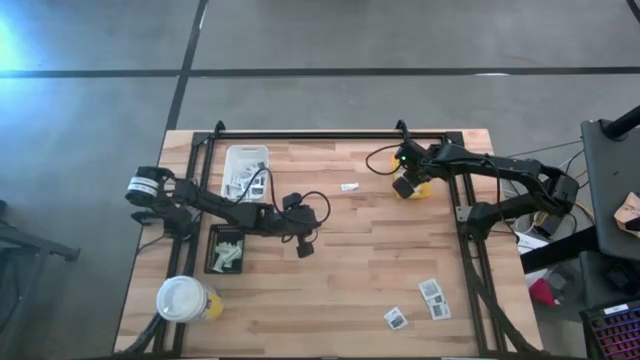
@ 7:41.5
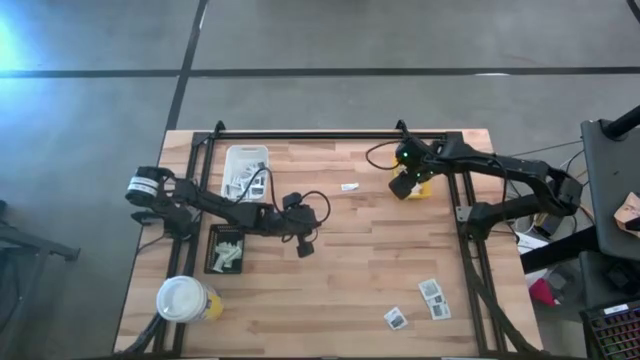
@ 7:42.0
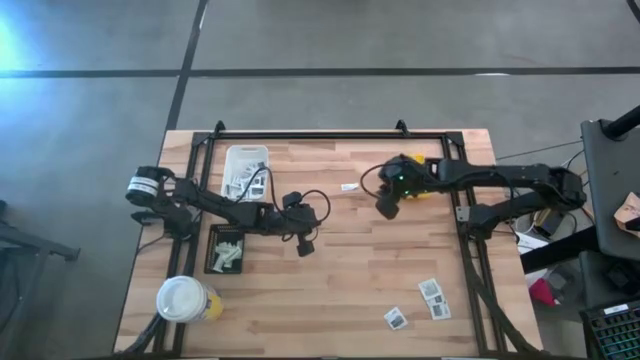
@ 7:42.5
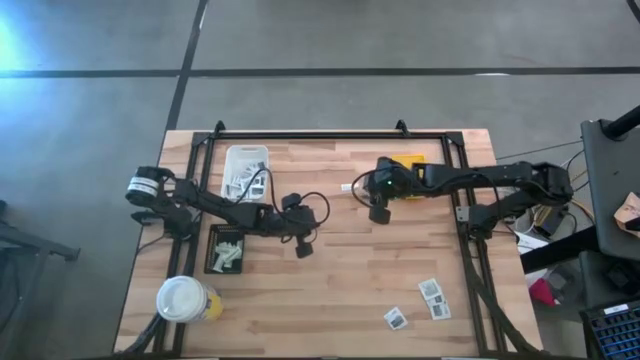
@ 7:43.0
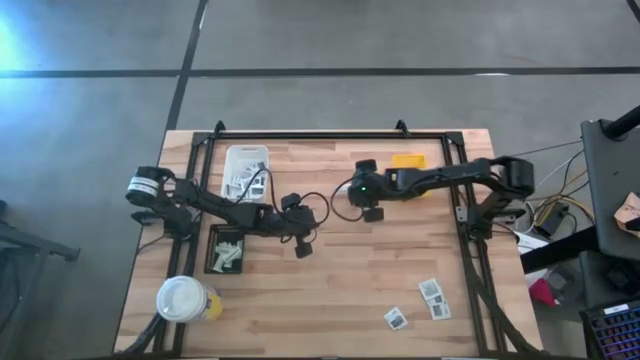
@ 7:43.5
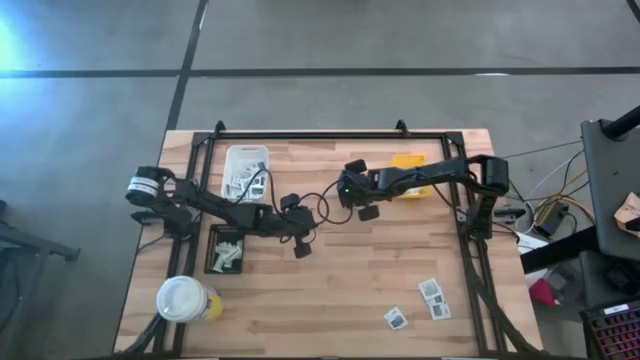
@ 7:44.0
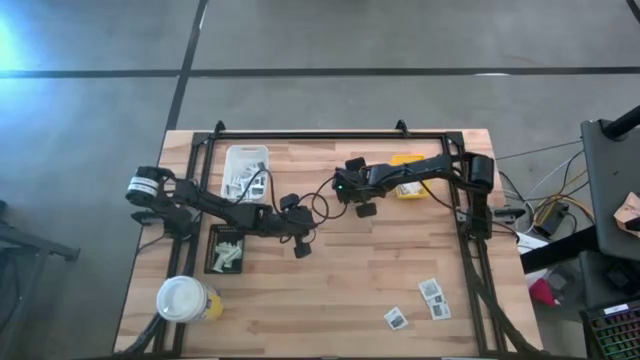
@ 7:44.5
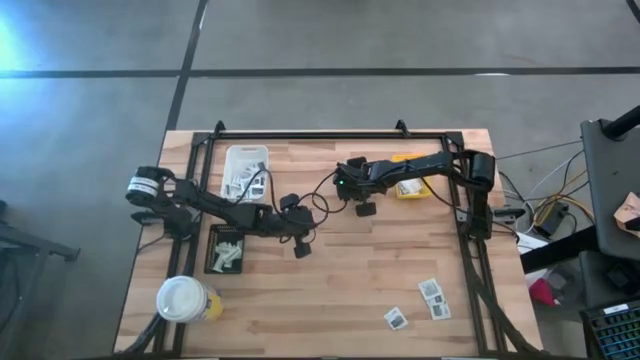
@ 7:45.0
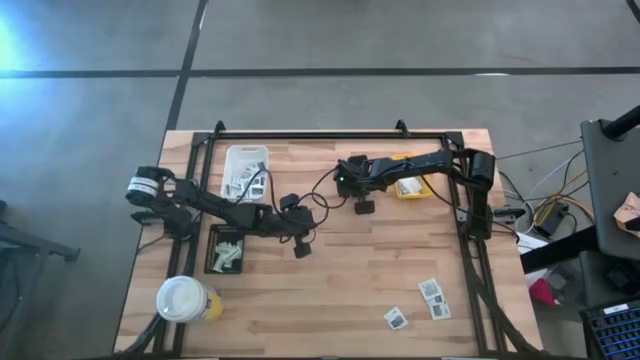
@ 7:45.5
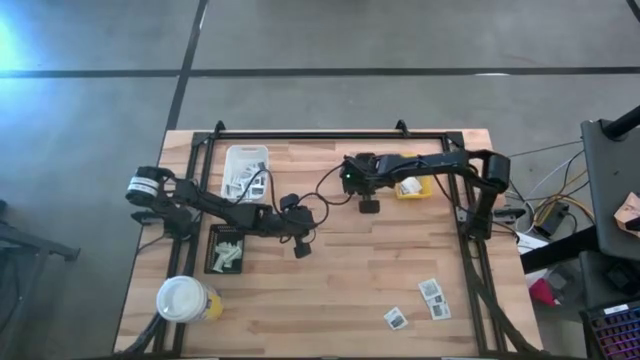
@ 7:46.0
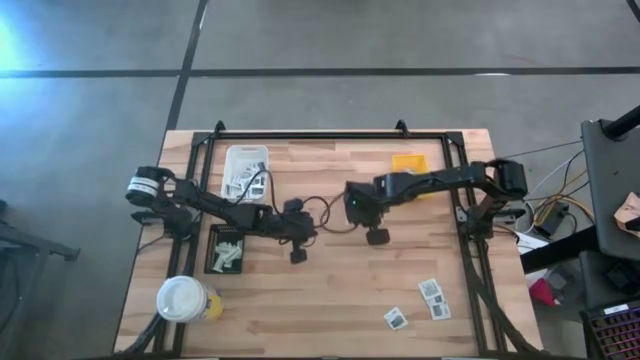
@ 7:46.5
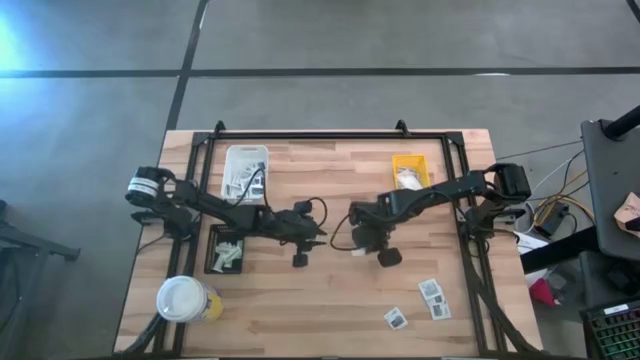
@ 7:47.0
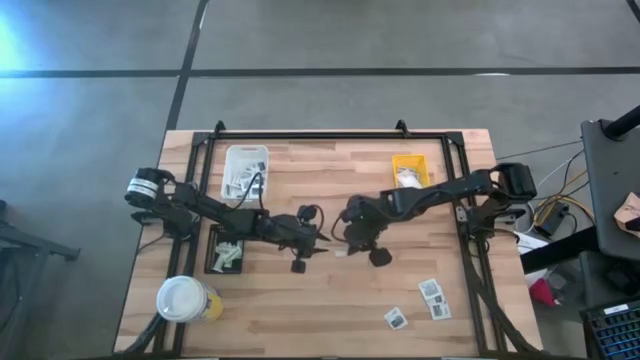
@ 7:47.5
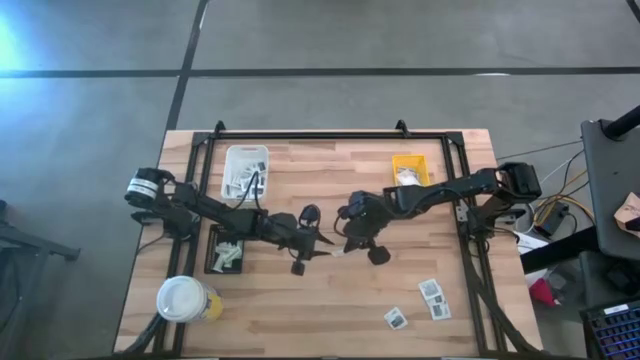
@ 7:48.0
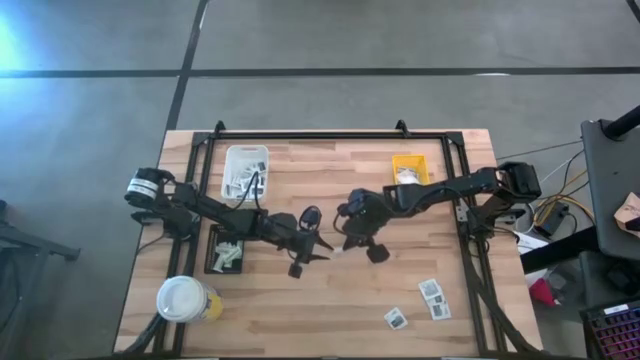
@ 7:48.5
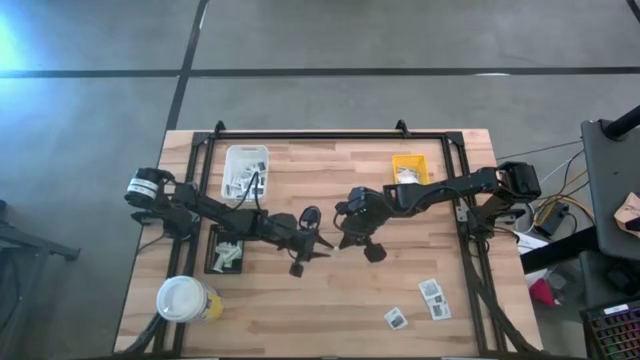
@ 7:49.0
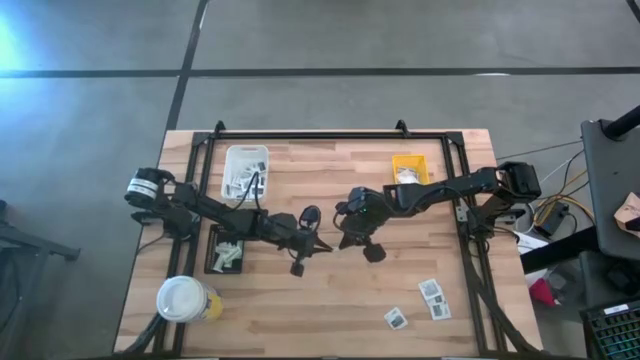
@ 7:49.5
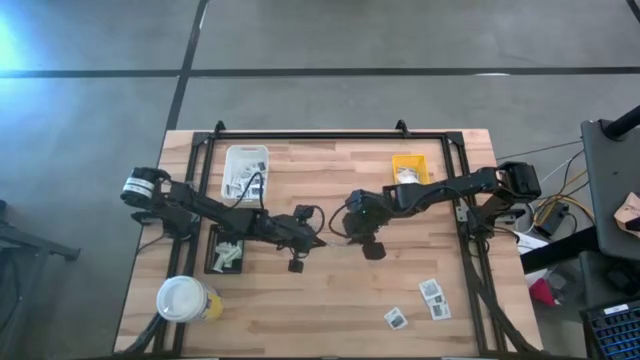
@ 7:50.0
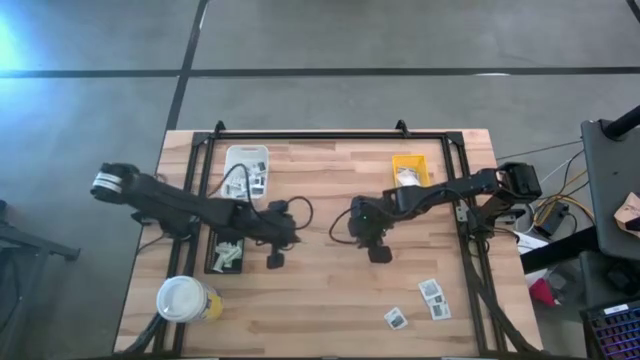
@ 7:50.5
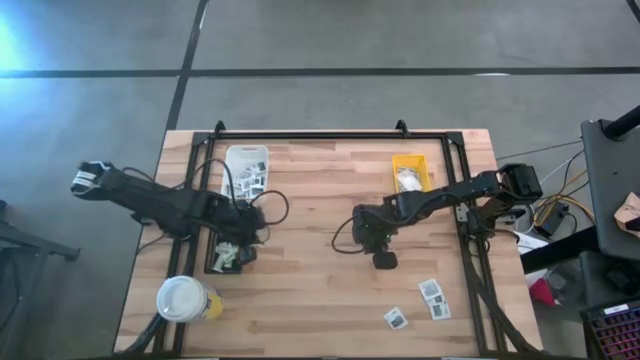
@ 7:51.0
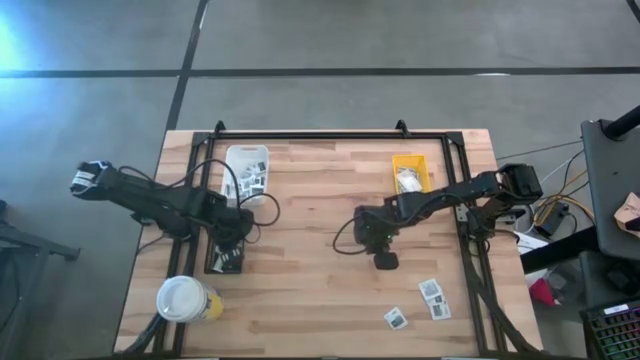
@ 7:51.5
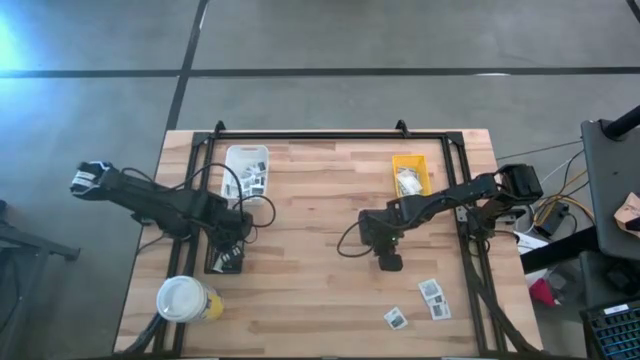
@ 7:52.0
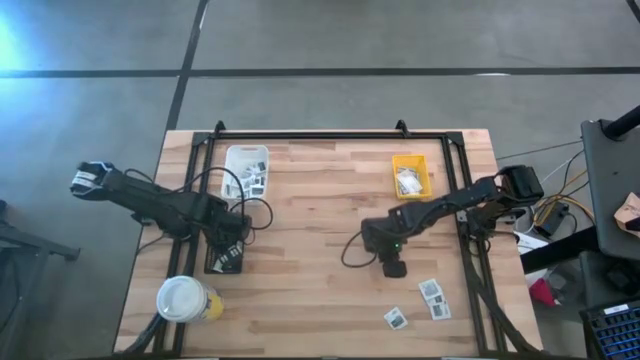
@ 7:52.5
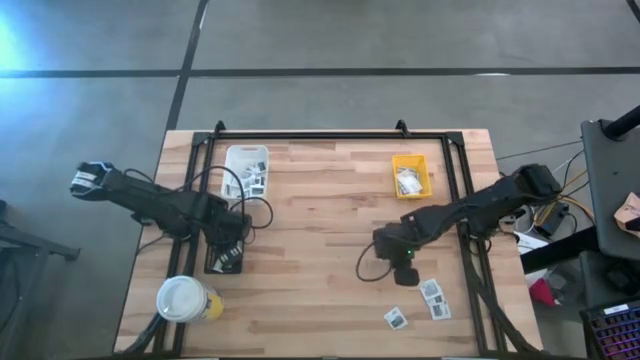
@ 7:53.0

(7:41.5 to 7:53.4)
Task: Pick & Place First Aid Supplies
Put the green bandage pack into the black bin

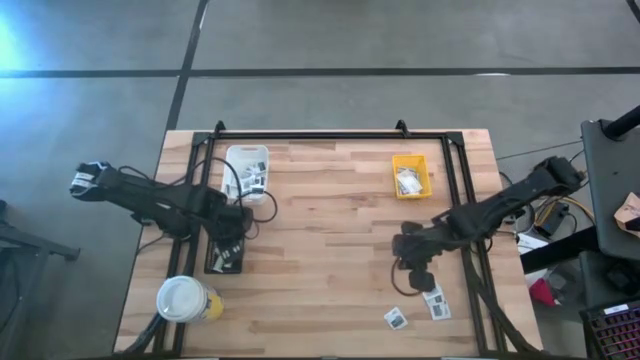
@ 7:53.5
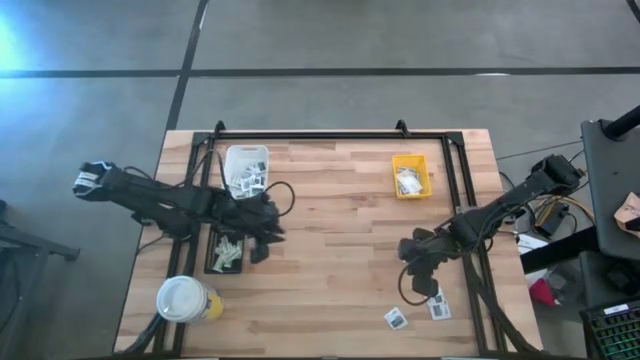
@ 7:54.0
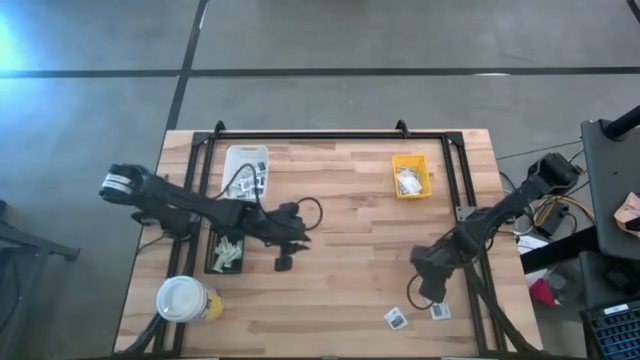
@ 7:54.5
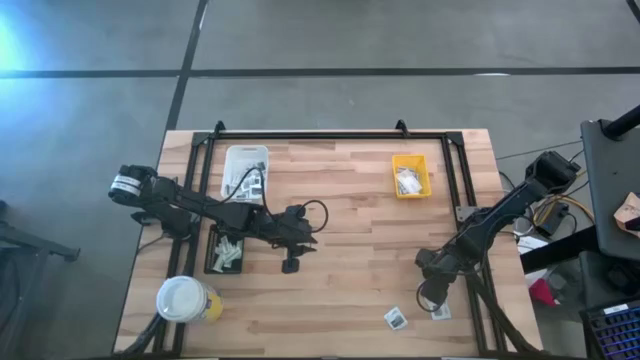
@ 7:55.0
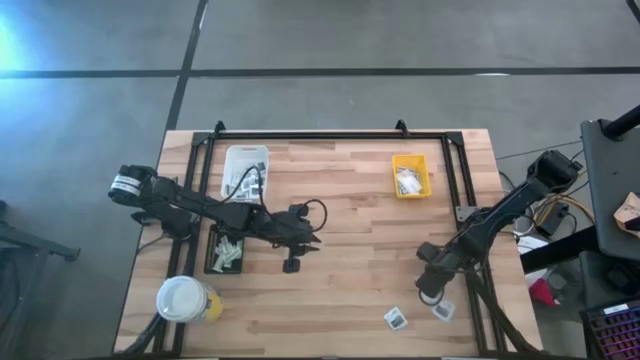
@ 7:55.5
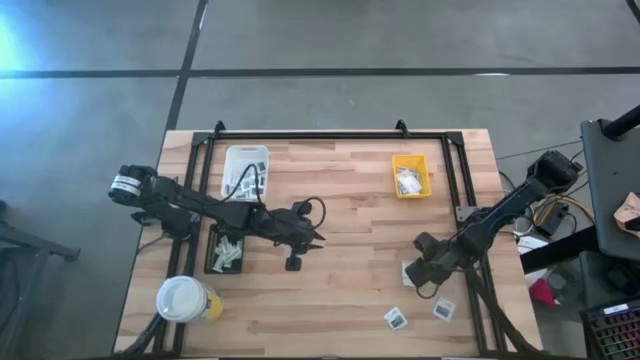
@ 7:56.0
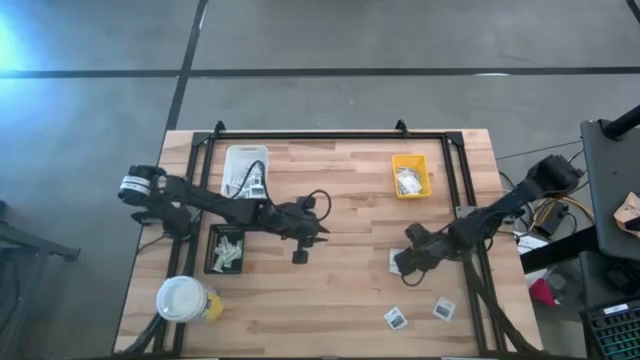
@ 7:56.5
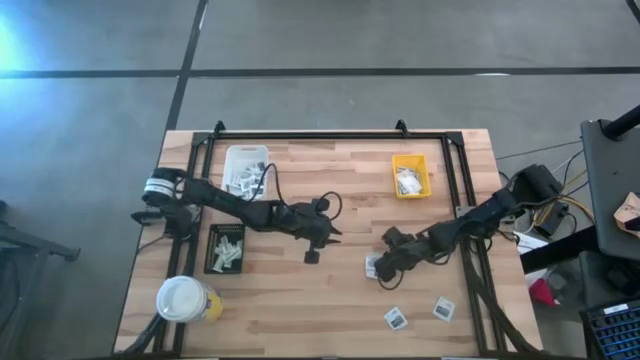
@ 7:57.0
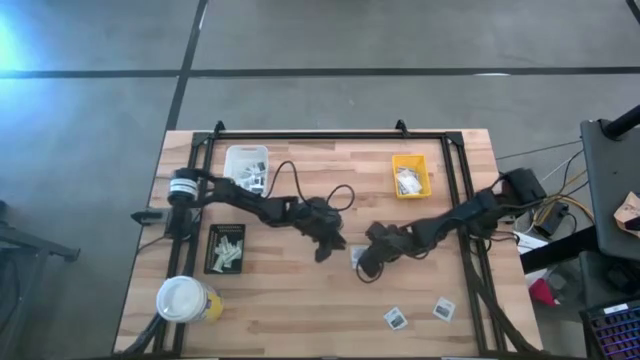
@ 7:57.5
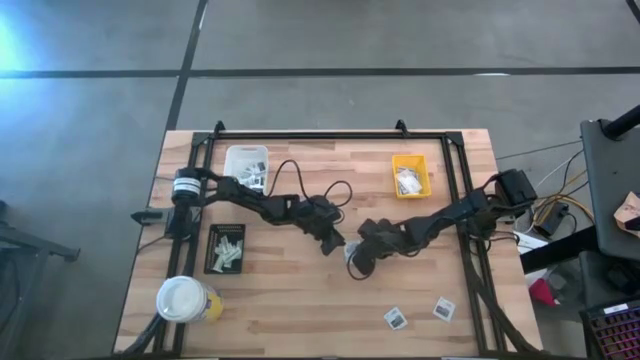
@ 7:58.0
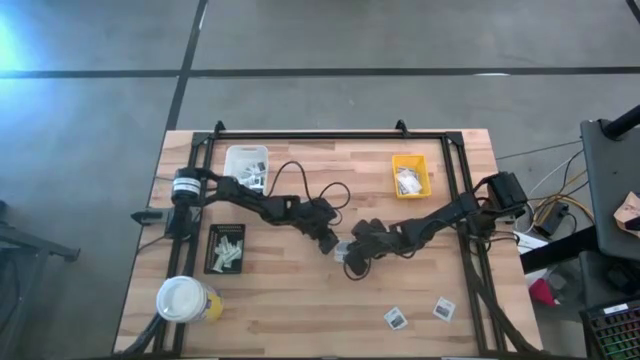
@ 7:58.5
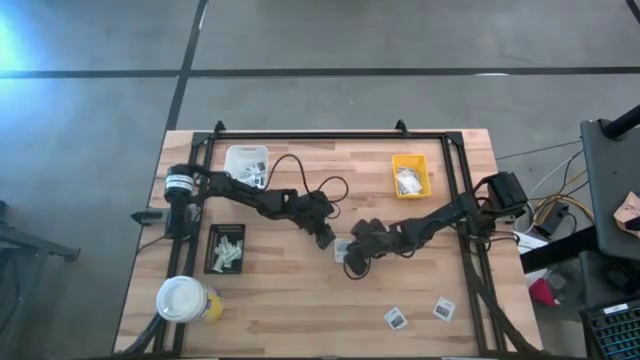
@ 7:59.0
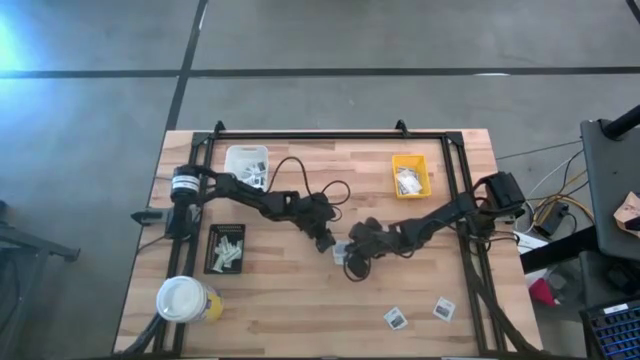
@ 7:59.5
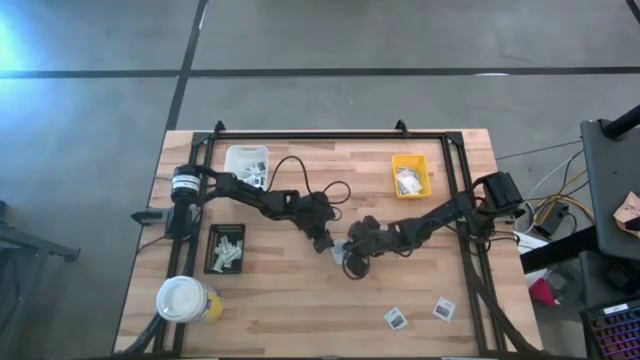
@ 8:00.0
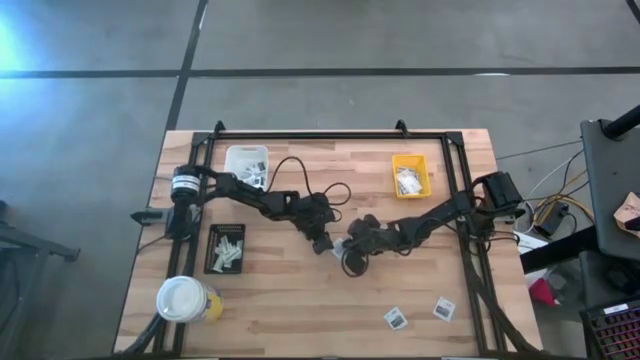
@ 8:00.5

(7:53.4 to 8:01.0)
Put the gray towelette pack into the white bin

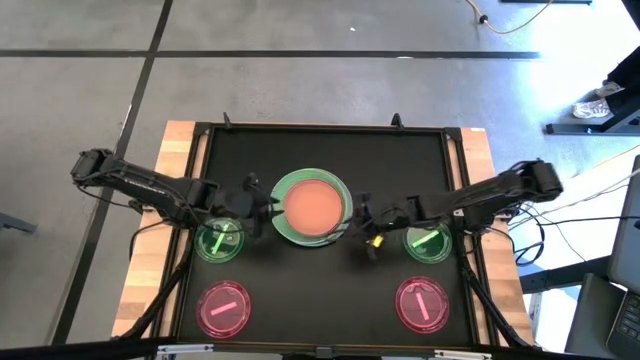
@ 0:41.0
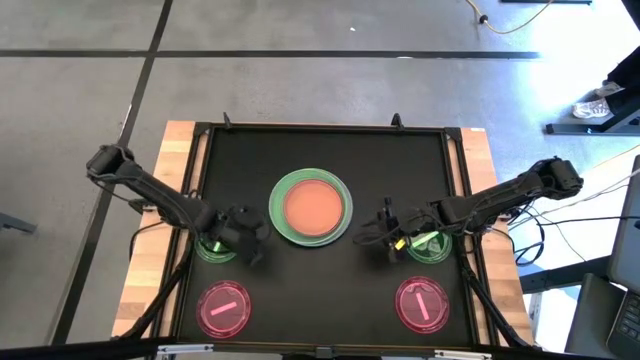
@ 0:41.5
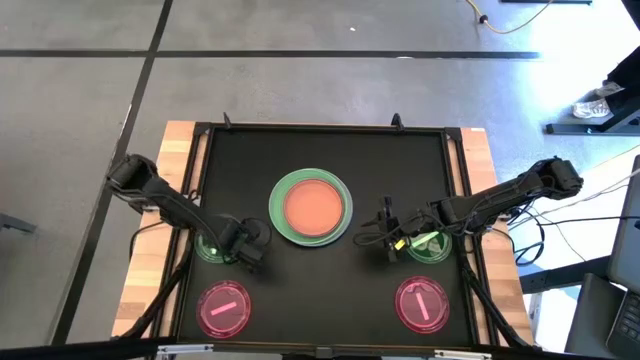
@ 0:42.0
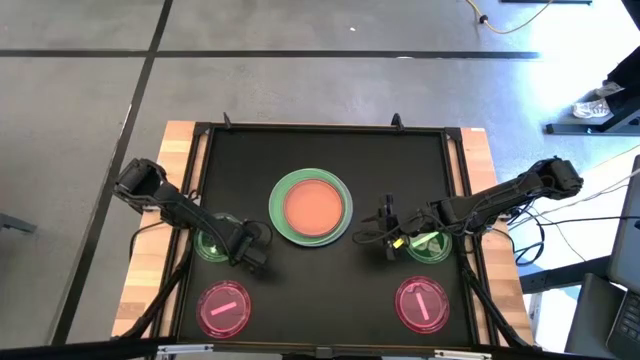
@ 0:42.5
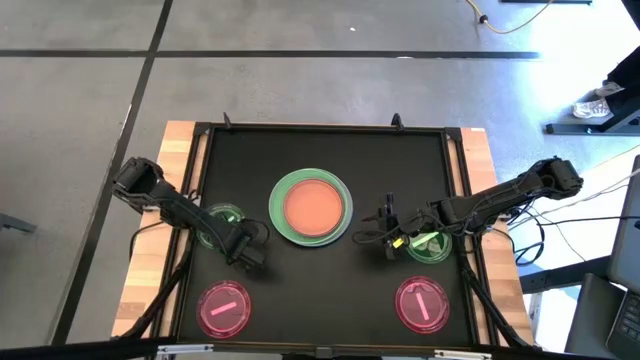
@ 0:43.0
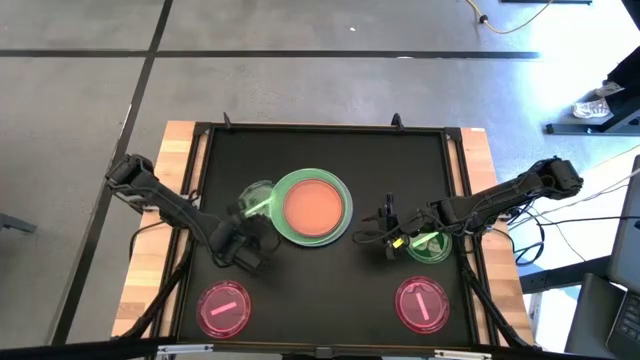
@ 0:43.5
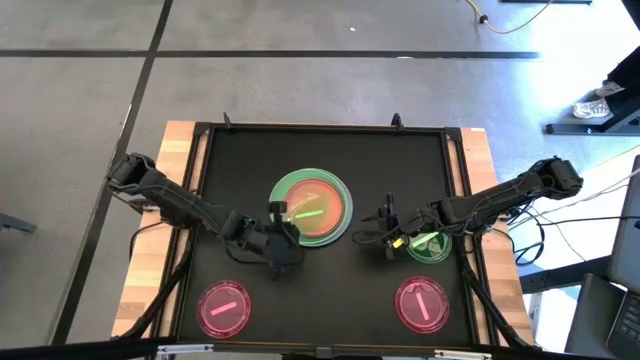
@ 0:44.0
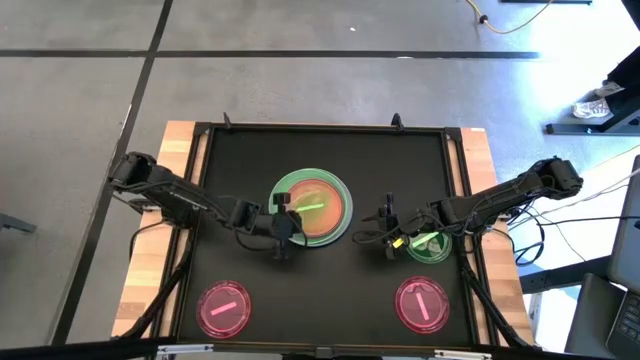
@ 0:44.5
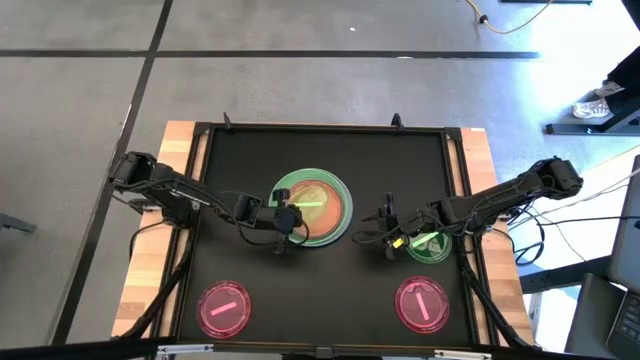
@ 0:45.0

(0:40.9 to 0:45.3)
Task: Stack plastic plates
Stack the left light green plate on the orange plate
